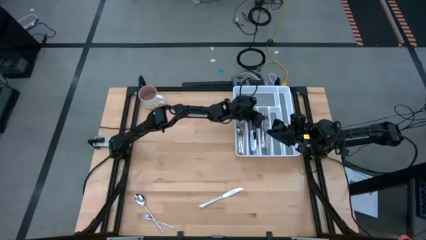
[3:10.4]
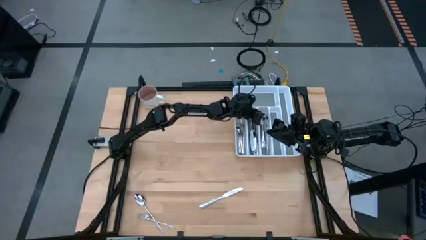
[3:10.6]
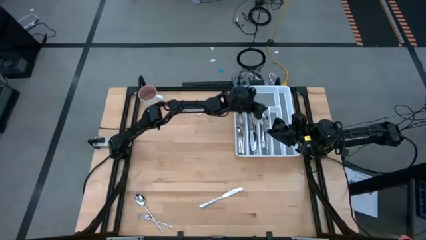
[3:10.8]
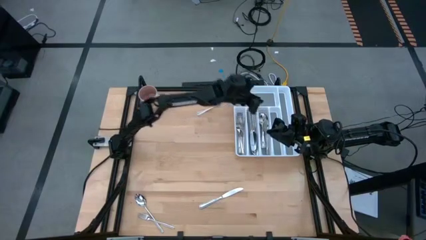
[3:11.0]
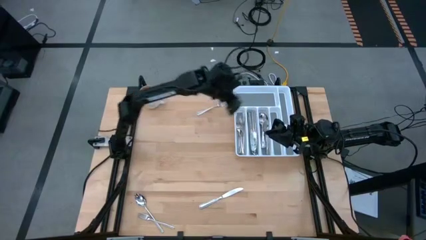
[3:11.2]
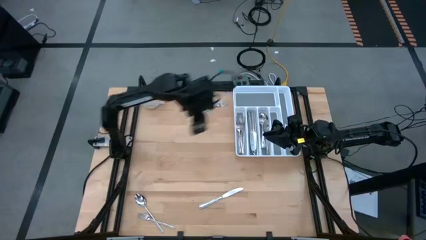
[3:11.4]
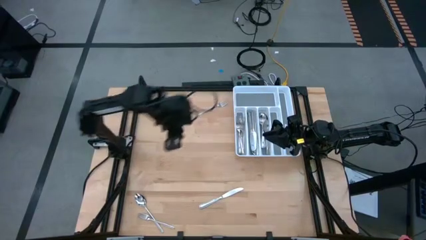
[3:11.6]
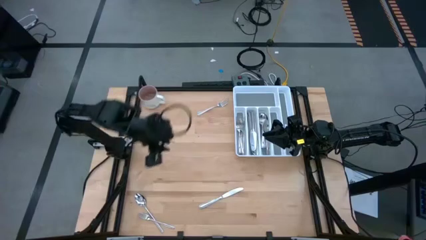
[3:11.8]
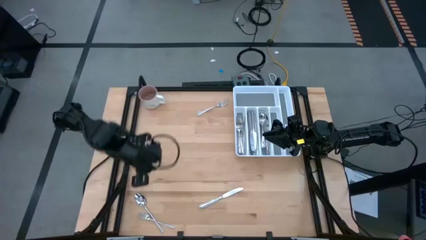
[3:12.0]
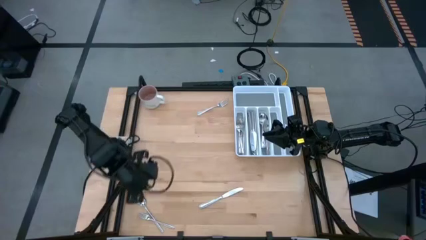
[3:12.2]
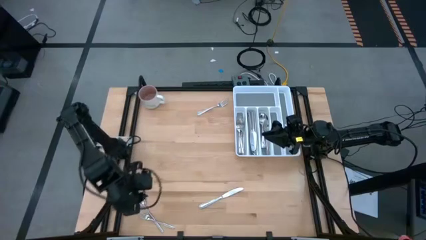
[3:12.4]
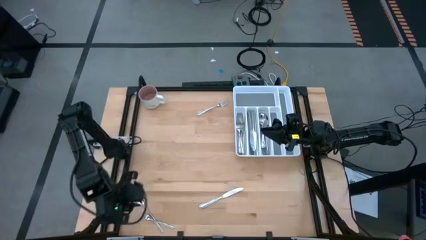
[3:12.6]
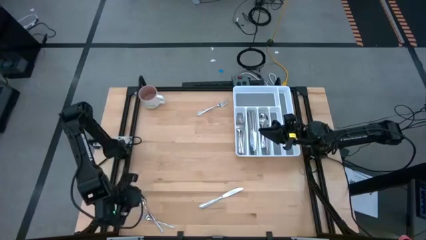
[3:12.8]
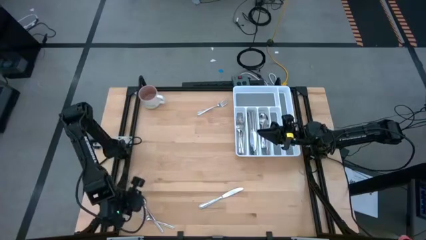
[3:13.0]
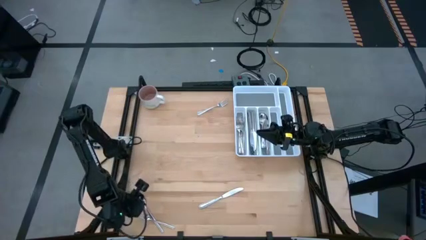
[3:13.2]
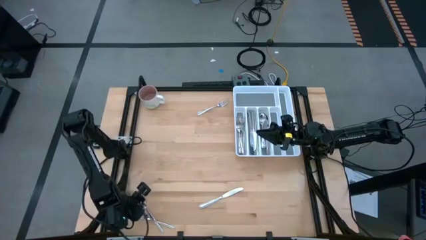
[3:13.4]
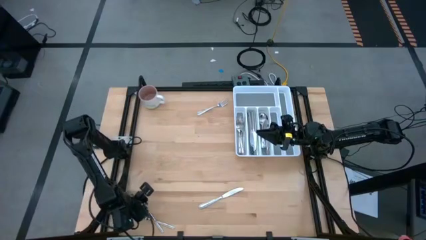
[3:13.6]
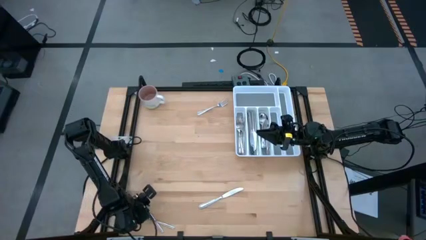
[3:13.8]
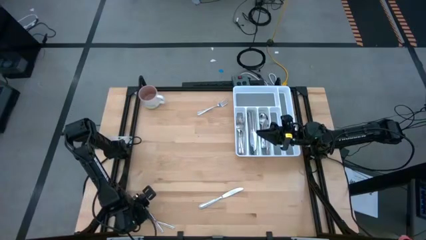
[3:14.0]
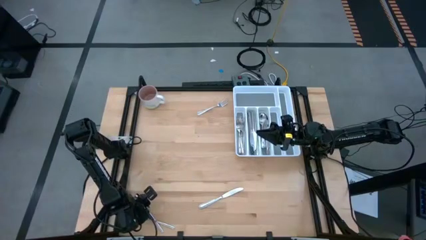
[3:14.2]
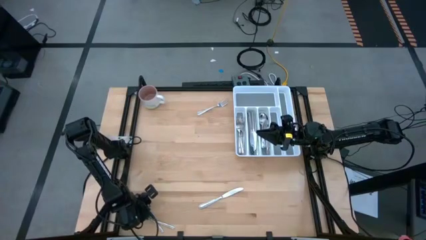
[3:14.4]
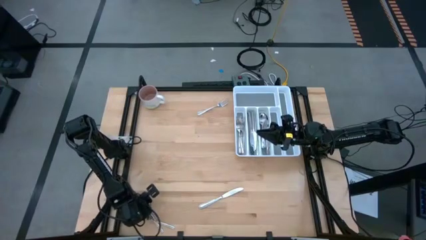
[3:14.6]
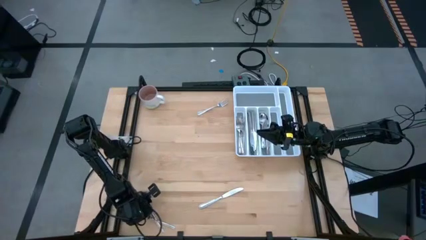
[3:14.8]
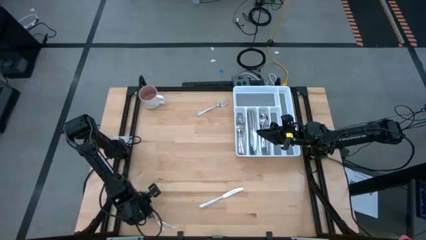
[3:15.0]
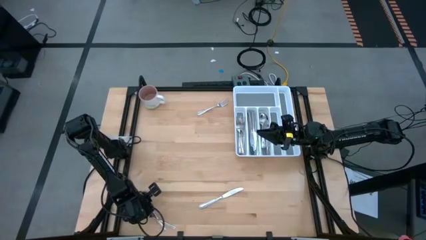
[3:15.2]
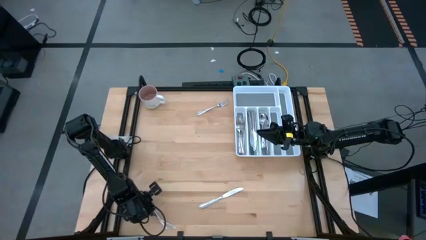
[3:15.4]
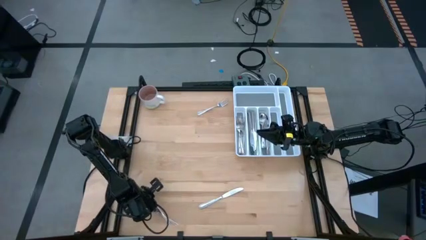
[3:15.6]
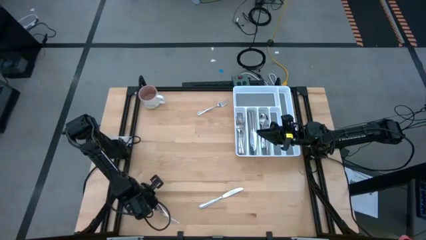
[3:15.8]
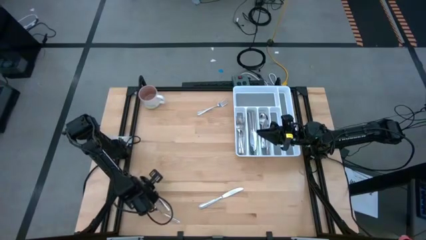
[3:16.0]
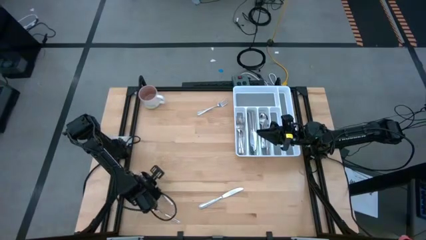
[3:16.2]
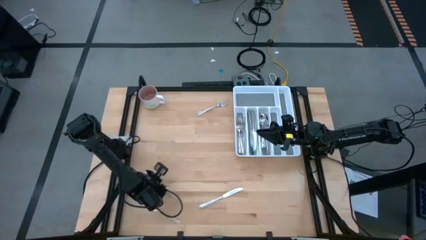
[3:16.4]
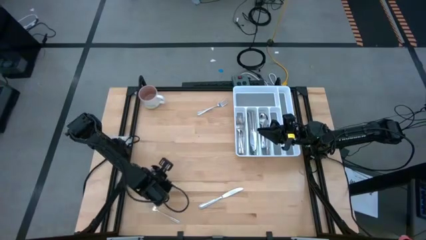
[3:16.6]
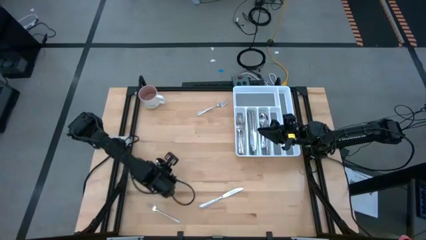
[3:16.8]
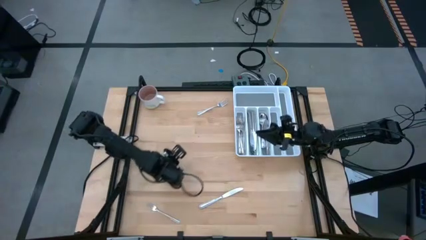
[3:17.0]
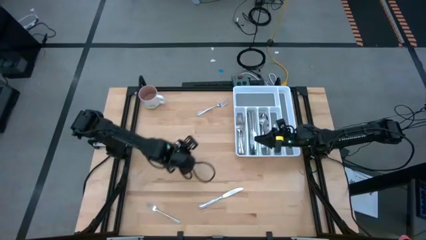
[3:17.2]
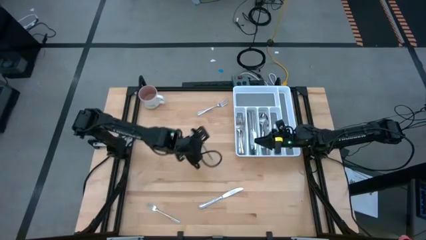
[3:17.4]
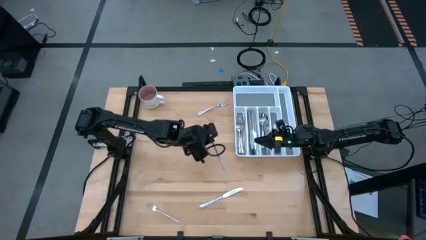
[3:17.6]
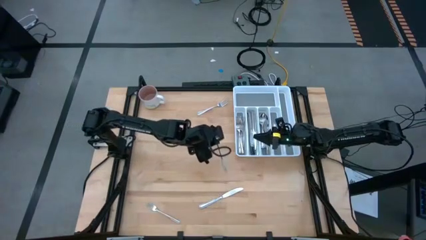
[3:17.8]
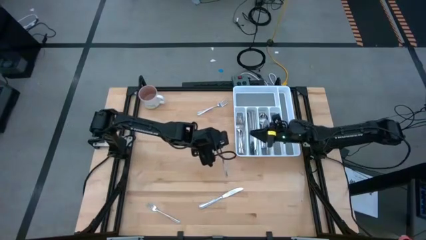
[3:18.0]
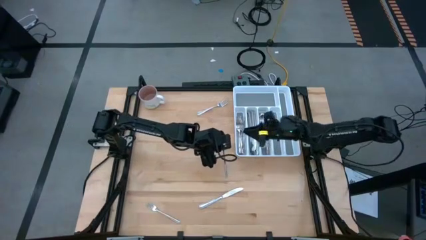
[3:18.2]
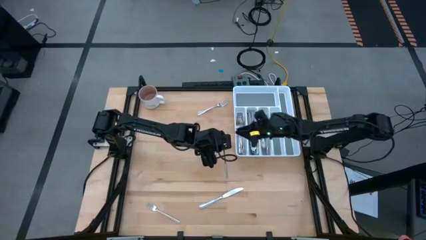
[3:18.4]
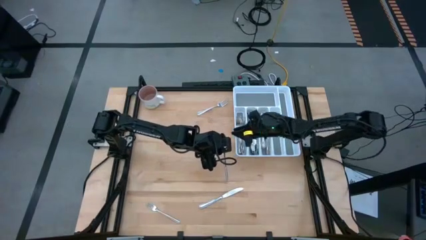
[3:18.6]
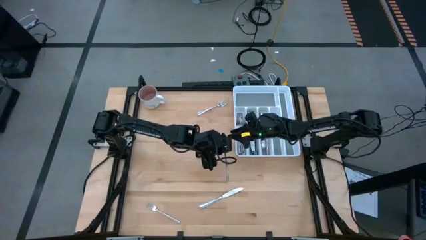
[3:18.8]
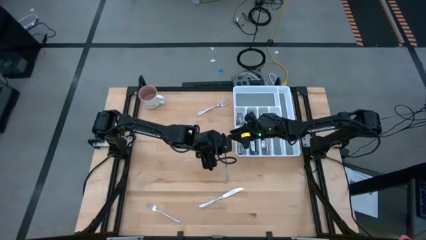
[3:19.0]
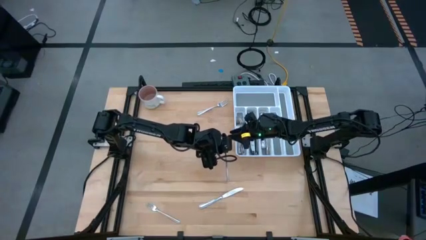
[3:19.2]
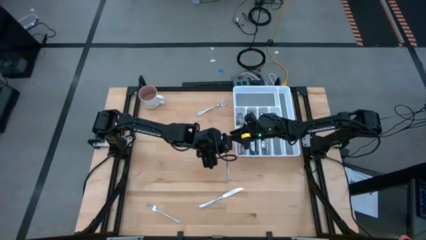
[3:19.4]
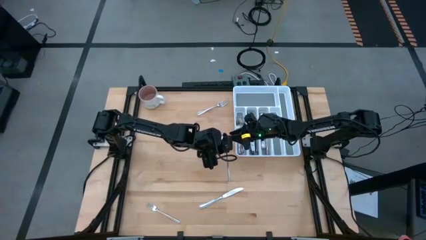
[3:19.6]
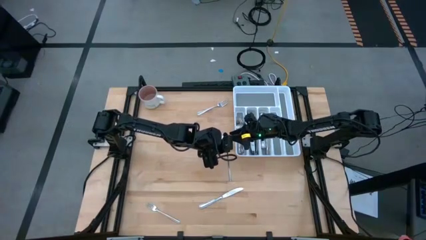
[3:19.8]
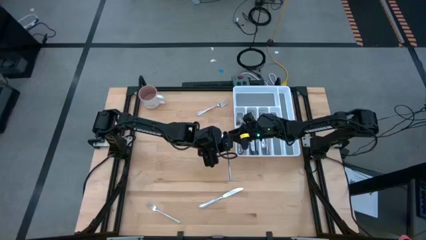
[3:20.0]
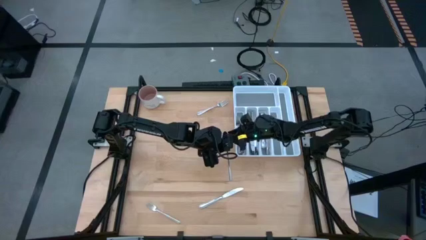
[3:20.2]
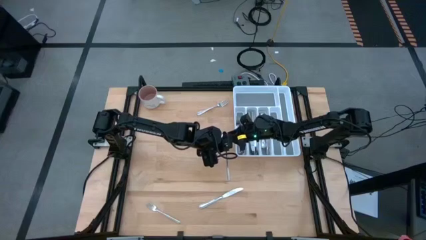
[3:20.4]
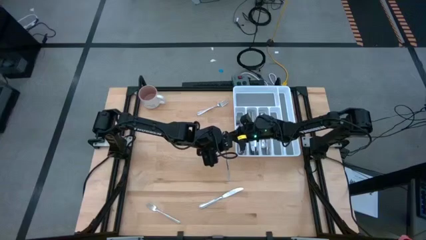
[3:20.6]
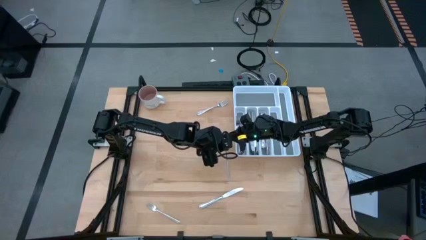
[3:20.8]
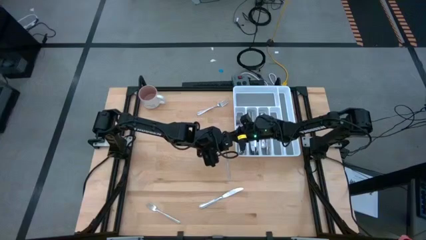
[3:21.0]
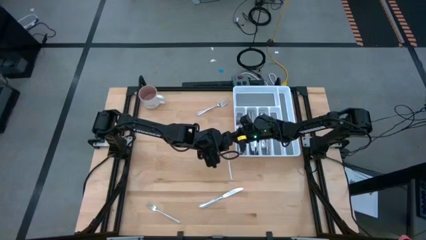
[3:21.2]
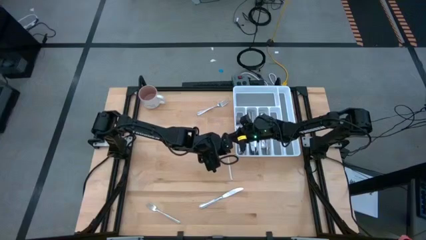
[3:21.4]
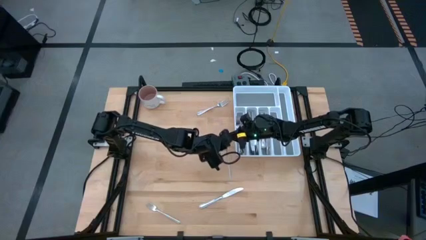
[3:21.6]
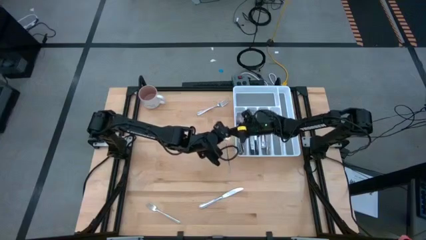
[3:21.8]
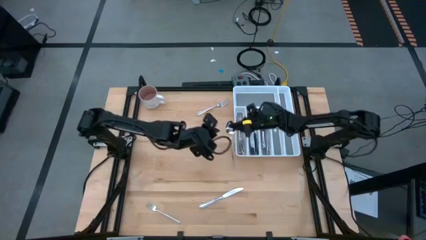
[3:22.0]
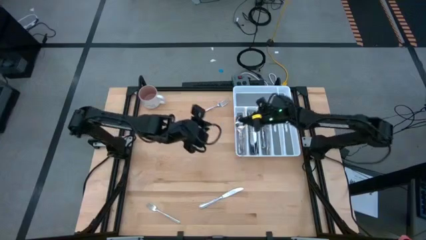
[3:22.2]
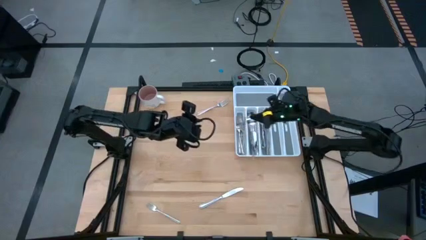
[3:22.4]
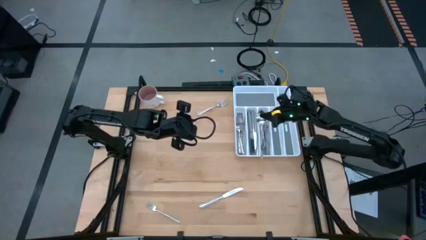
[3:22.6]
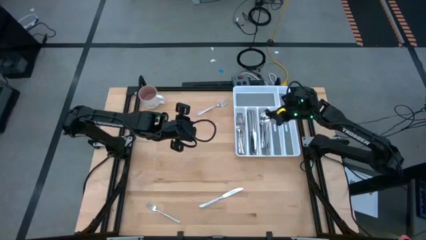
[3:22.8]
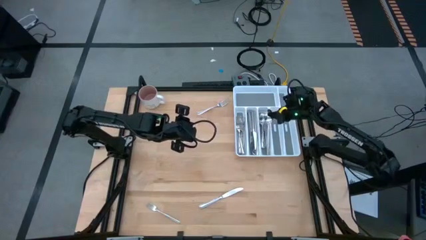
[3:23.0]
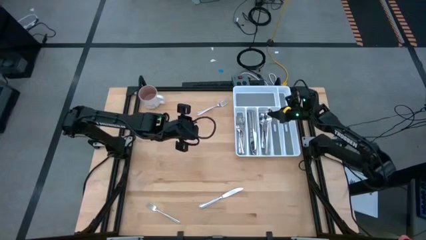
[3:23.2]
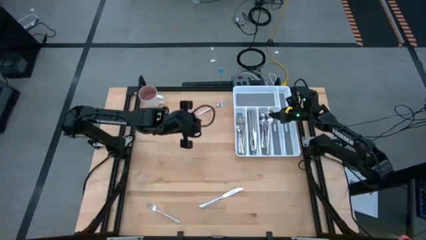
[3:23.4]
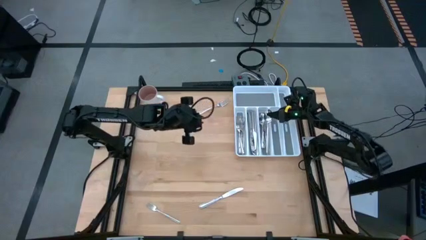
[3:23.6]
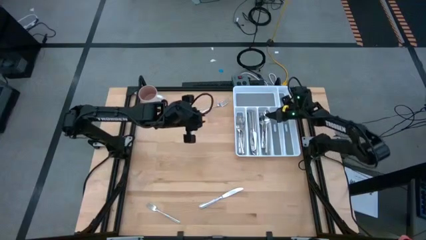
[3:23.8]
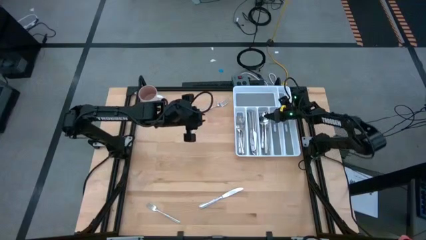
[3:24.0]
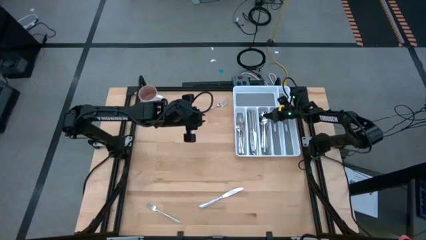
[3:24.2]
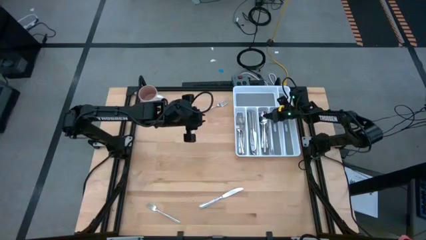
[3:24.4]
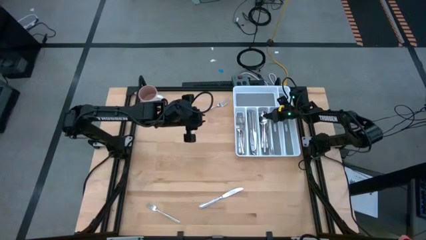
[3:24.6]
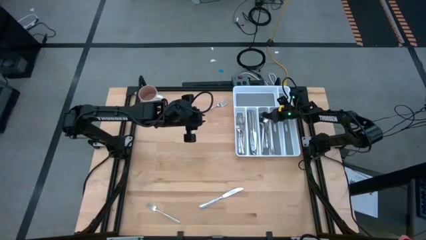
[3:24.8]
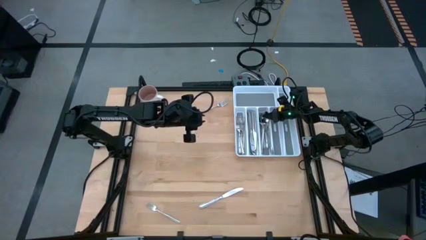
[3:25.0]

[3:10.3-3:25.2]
Task: Sort silverware
Put the silver spoon into the middle right slot of the white silverware tray
